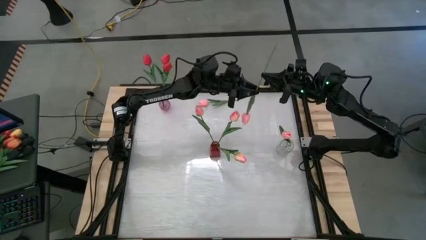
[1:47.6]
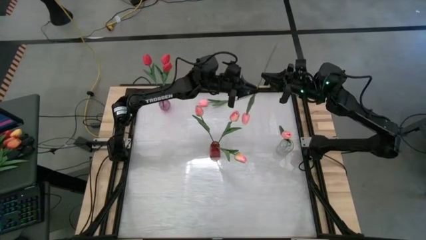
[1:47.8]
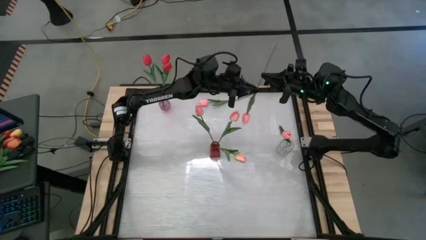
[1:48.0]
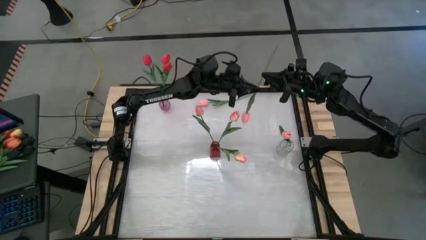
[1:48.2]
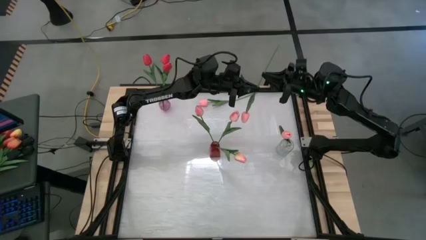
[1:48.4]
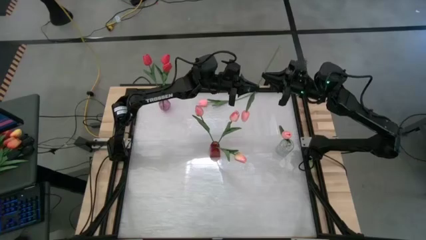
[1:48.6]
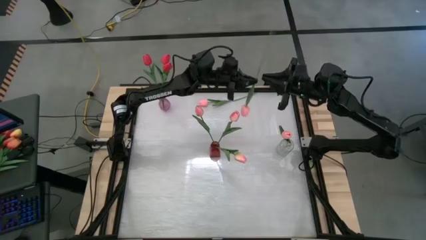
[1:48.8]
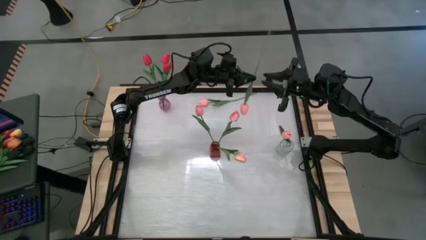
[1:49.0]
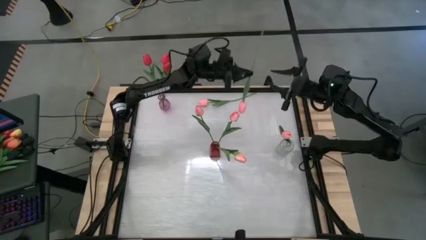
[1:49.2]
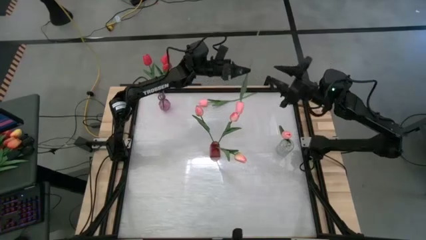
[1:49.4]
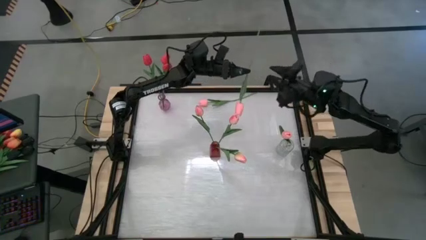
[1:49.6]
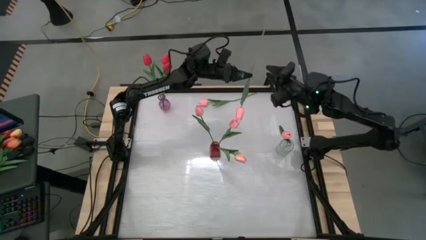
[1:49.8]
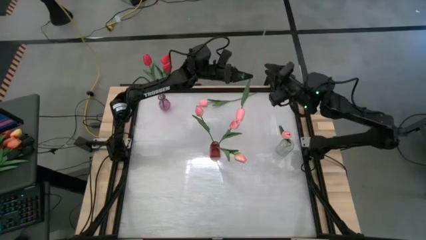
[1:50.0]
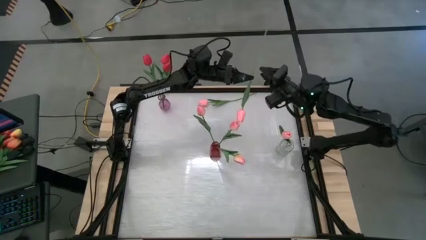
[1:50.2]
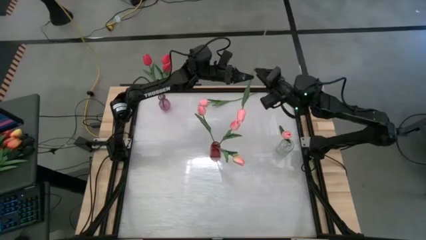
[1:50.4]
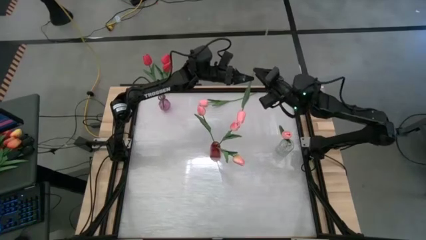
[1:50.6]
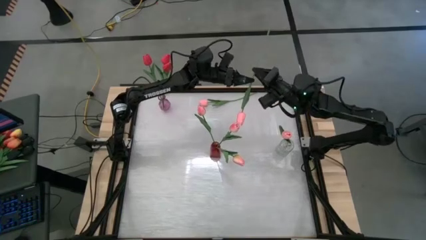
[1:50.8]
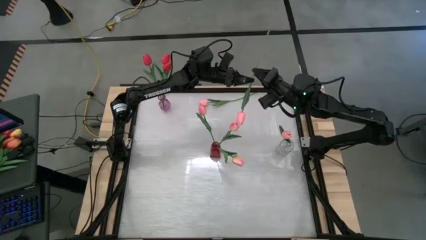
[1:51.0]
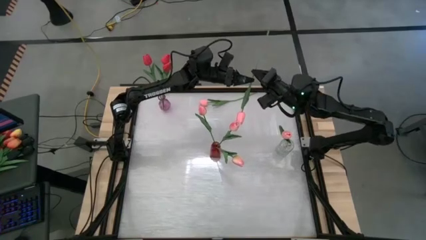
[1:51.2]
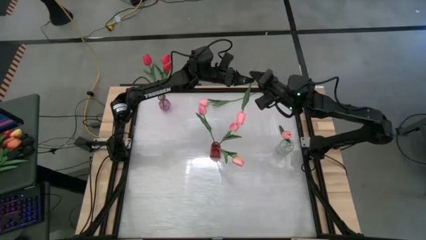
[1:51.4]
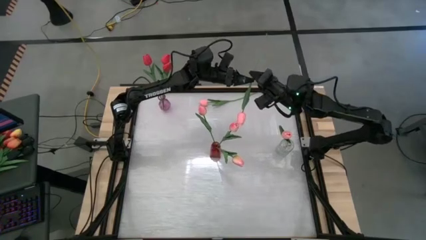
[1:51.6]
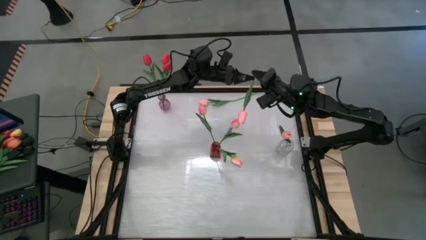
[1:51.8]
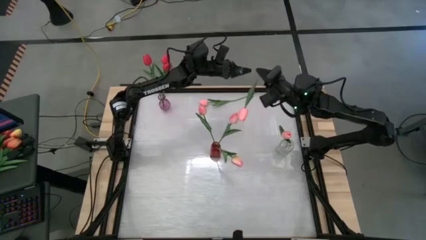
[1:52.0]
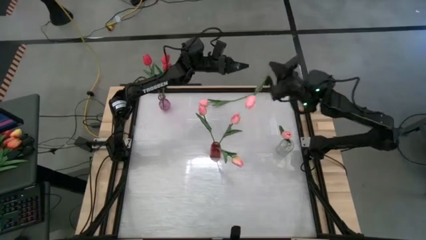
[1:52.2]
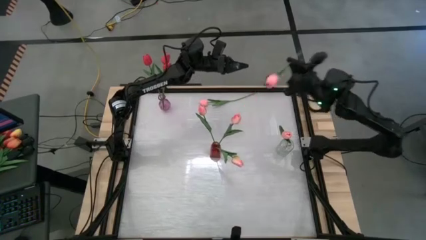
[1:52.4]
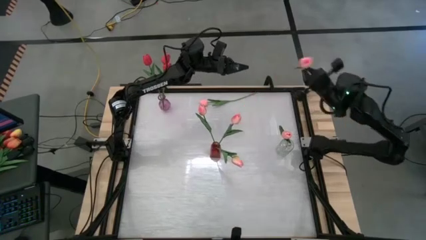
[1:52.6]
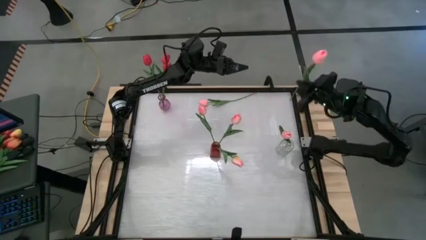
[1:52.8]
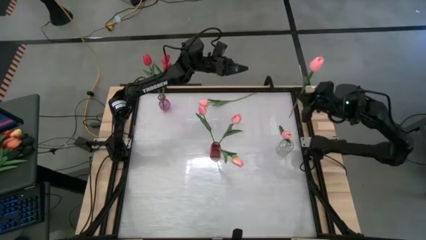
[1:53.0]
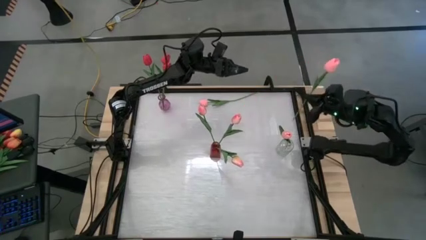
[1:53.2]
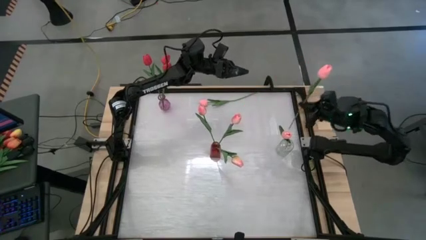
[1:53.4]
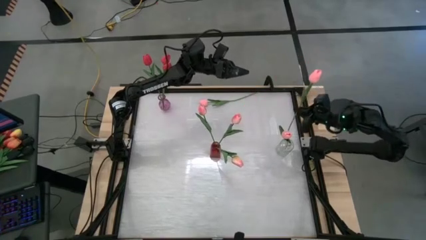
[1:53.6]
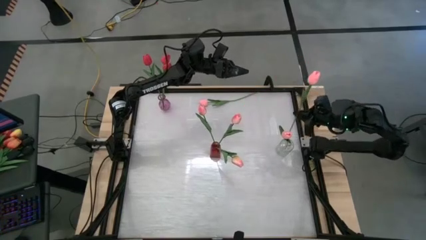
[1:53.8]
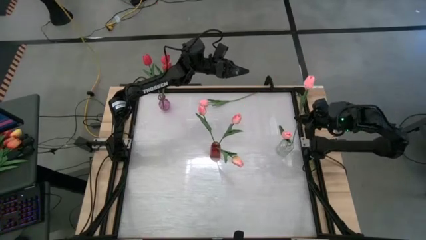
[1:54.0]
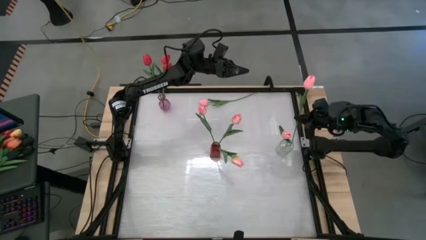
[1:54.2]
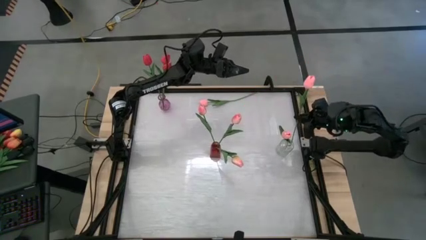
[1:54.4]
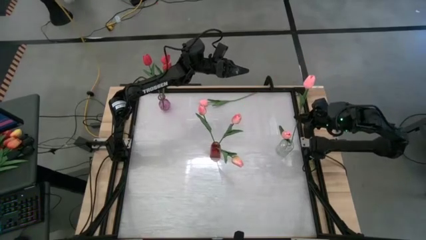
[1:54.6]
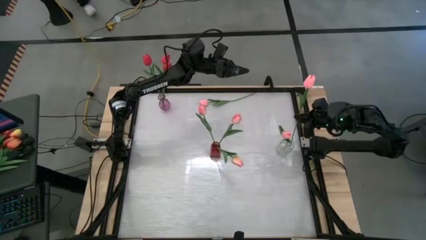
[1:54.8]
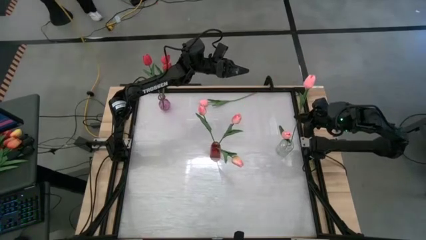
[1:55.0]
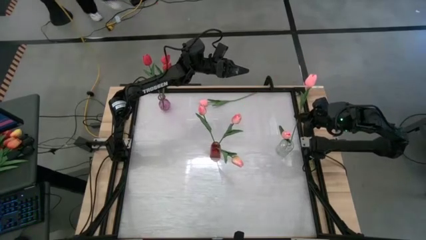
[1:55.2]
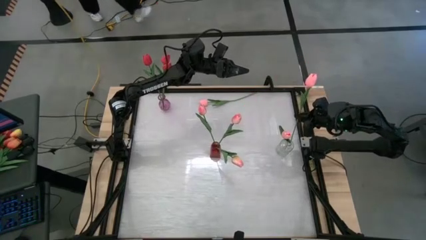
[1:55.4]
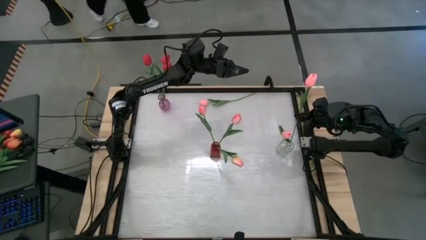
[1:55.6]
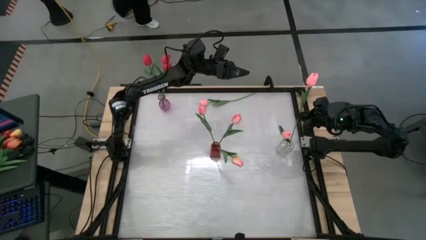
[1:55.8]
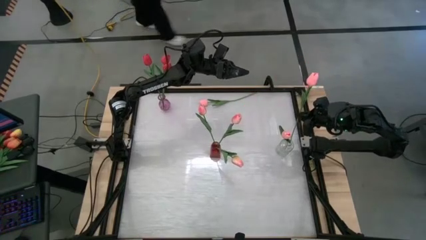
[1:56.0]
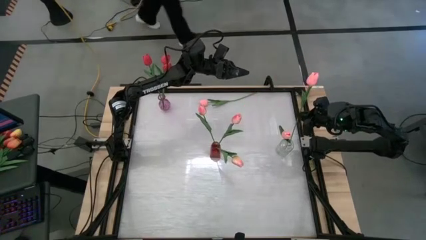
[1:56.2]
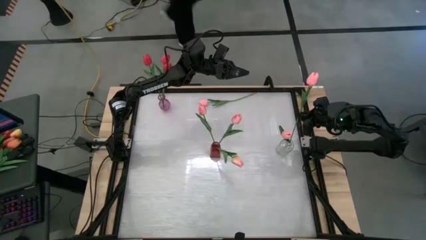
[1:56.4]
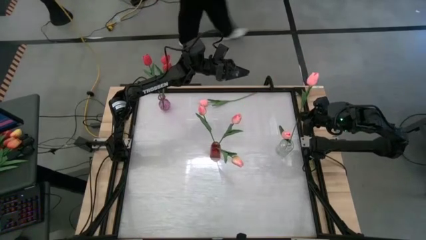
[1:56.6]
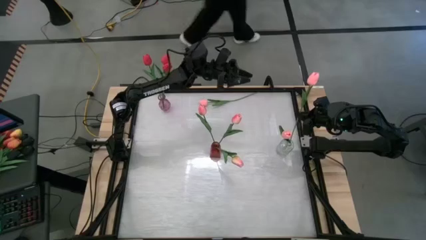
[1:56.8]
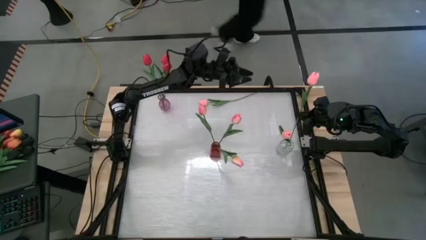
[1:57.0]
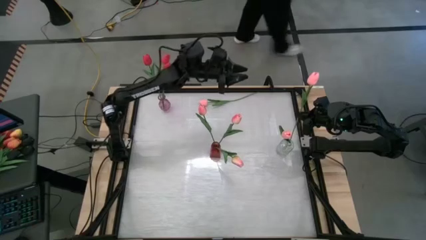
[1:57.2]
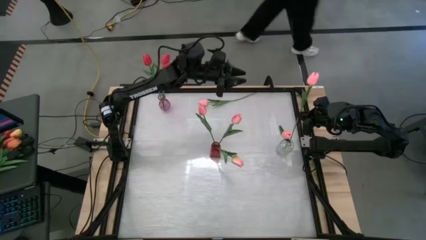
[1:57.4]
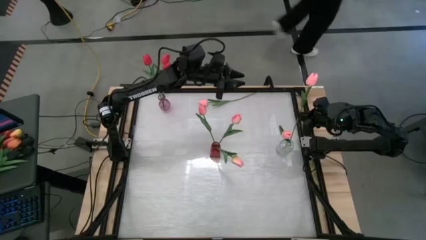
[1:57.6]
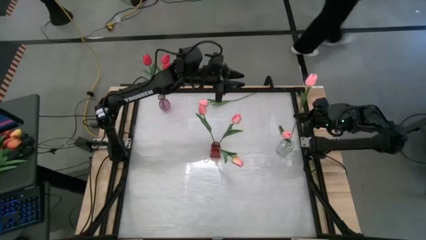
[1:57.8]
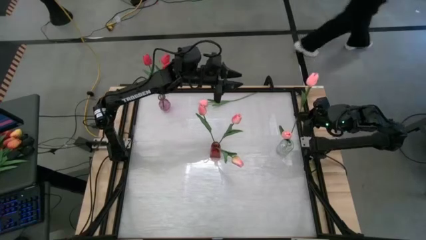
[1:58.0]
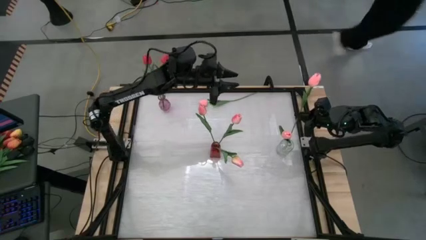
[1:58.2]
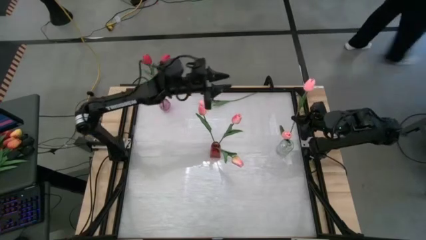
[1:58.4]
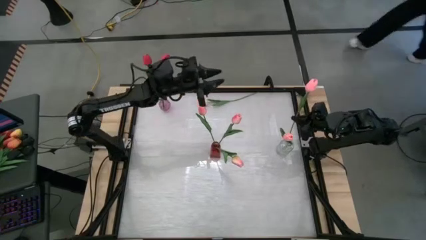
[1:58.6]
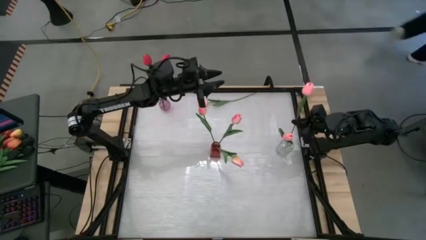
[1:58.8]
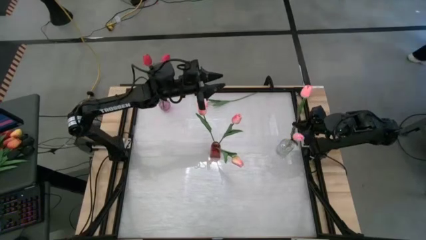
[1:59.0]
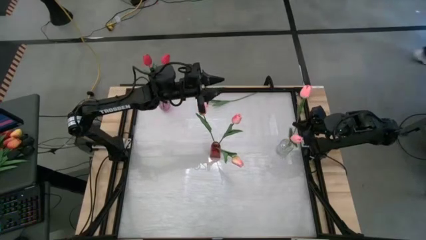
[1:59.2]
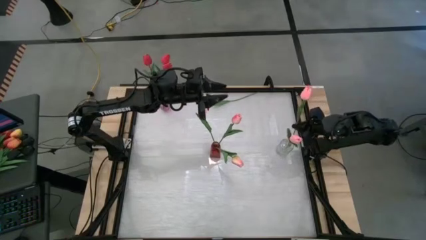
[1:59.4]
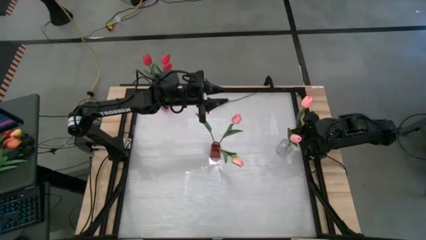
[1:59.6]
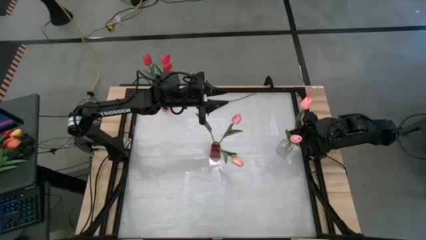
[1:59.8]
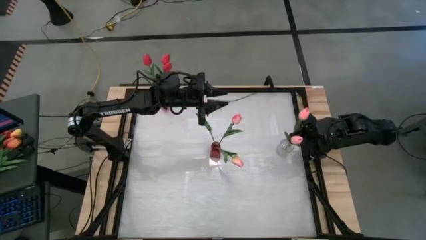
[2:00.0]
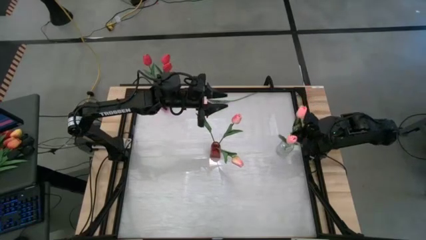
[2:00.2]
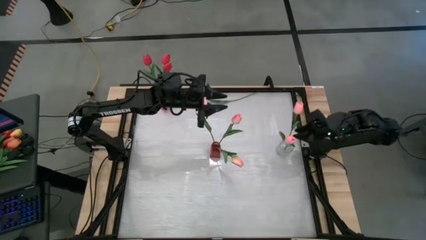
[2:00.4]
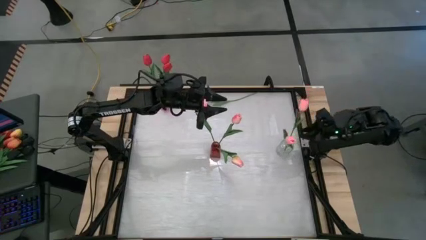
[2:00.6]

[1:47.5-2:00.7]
Task: Sort flowers into vase by color
Put the bottom pink tulip into the transparent vase
